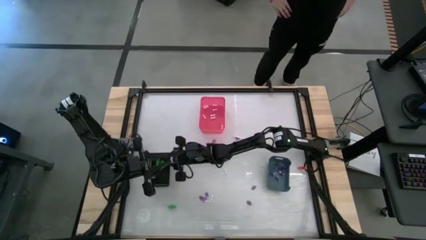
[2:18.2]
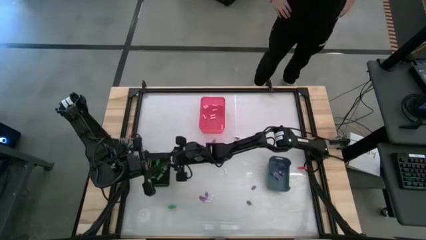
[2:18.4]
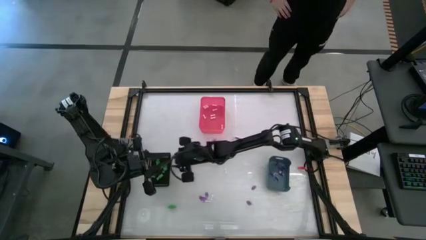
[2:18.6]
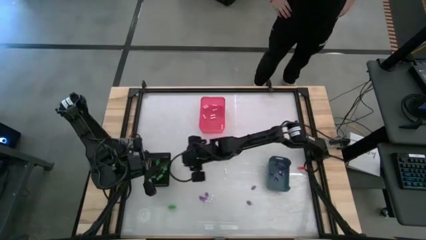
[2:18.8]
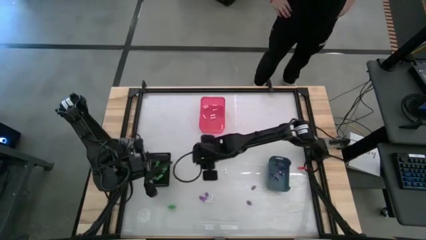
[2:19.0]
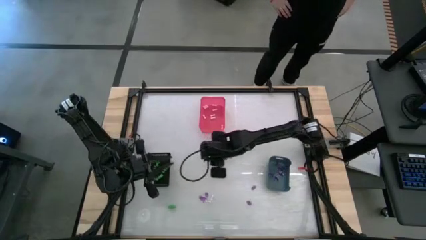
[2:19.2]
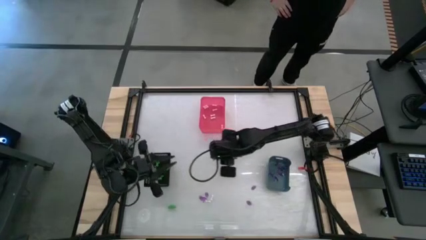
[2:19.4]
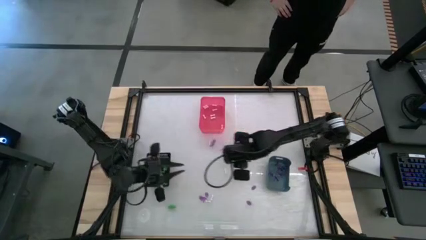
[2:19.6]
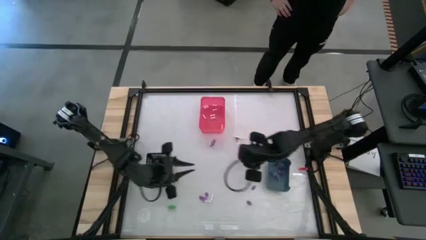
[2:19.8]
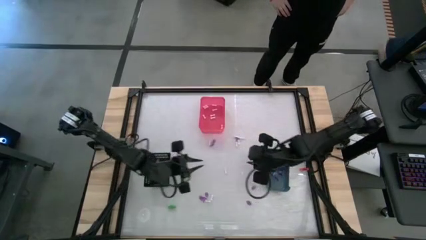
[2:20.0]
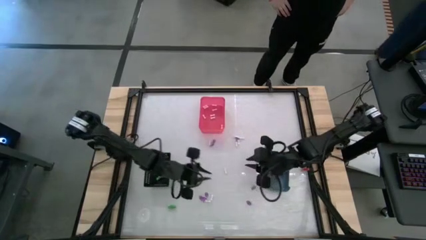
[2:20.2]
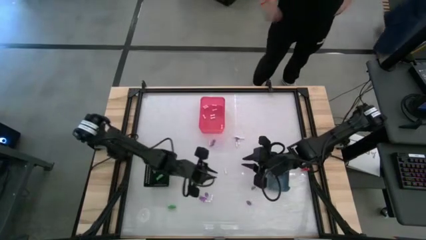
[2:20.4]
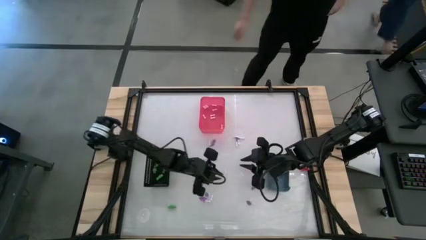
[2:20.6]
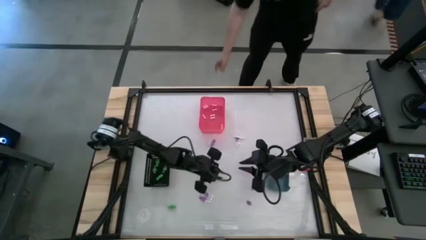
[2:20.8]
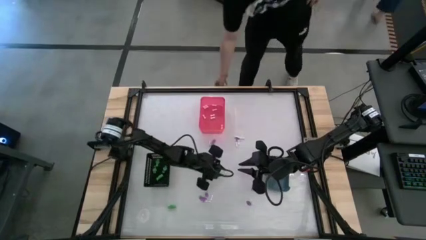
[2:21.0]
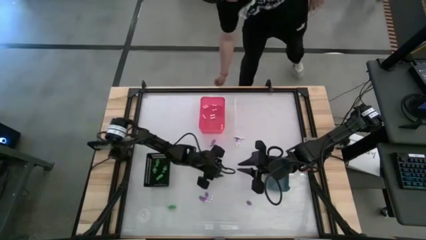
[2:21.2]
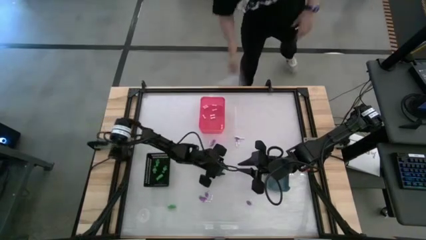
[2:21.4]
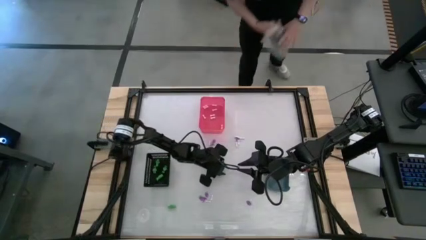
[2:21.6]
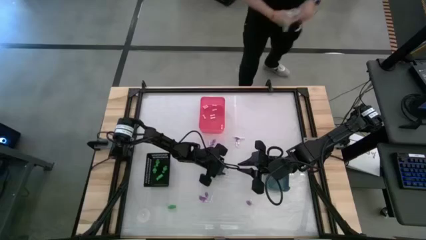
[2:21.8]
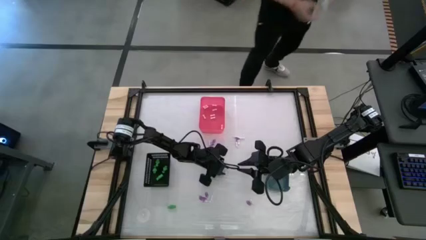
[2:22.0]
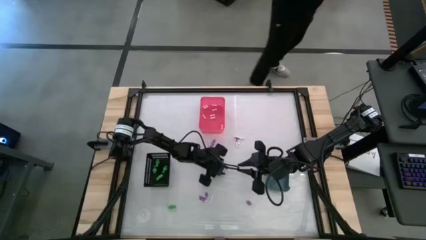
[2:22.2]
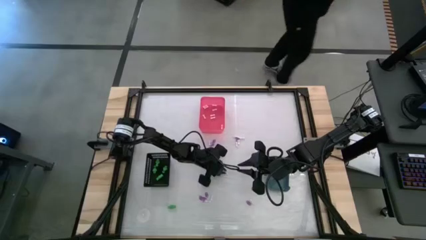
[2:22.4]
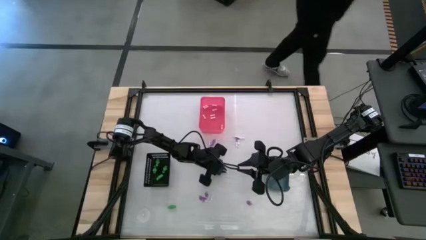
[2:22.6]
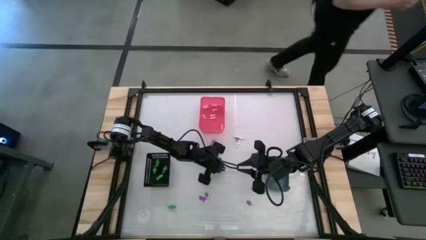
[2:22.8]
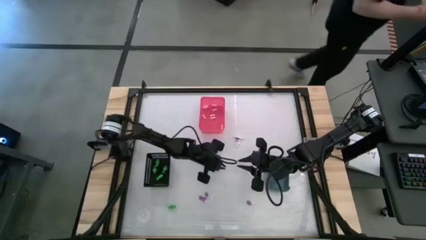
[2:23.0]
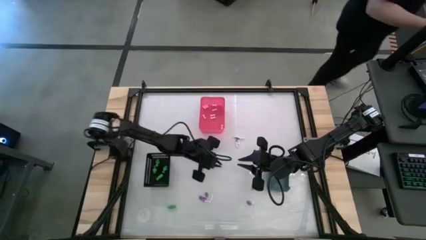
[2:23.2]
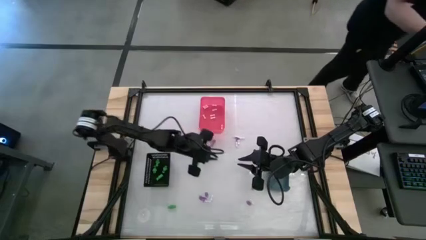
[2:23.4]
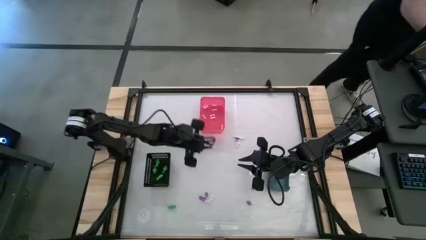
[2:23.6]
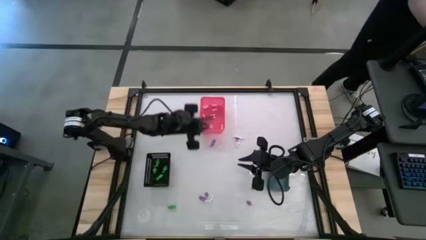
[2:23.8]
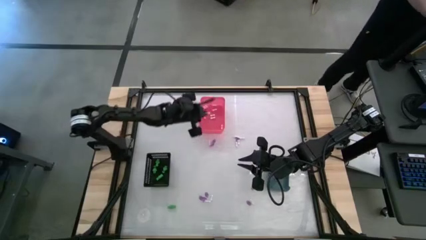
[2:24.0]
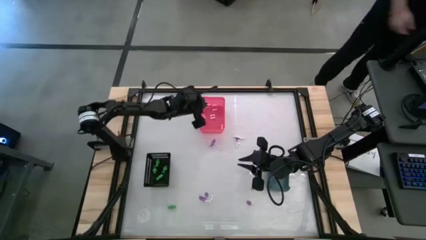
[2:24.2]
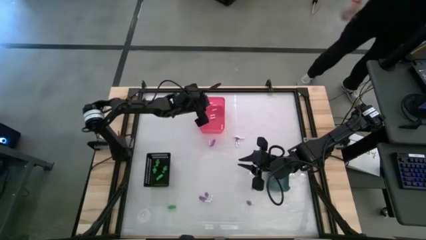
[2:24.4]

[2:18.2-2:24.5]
Task: Sort Halloween decoration
Put the bone toy into the red bin

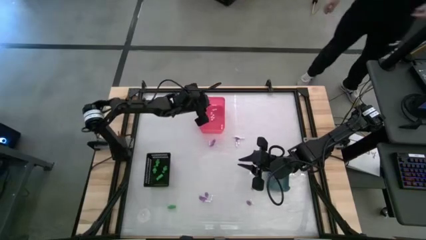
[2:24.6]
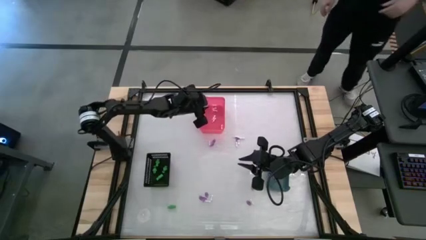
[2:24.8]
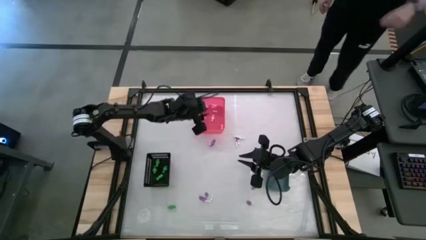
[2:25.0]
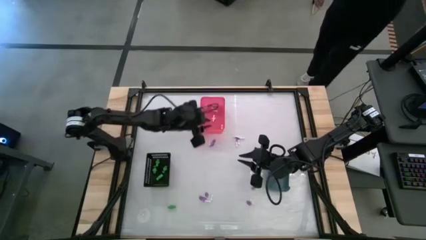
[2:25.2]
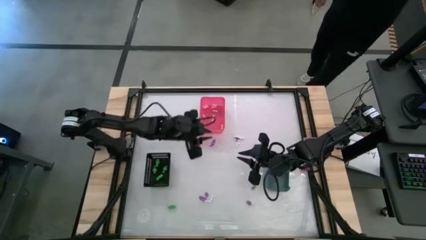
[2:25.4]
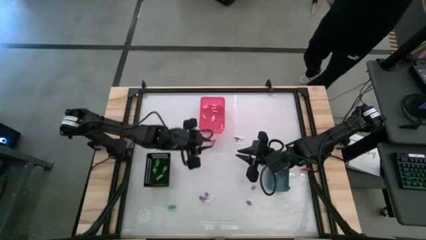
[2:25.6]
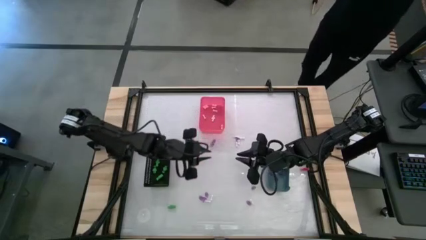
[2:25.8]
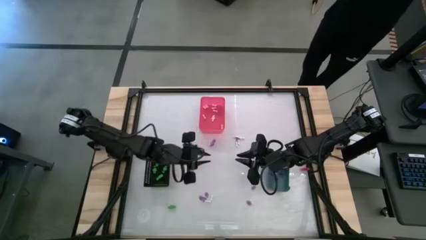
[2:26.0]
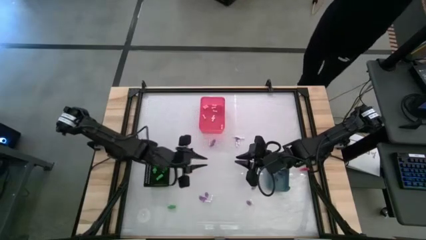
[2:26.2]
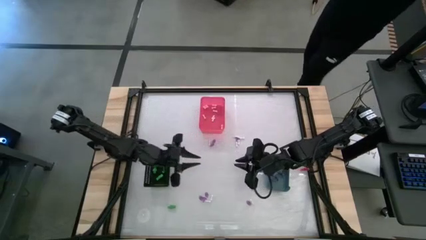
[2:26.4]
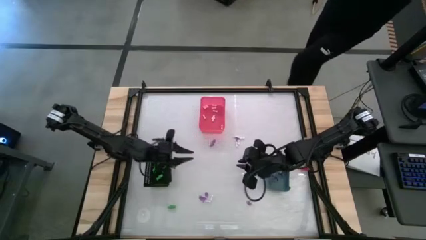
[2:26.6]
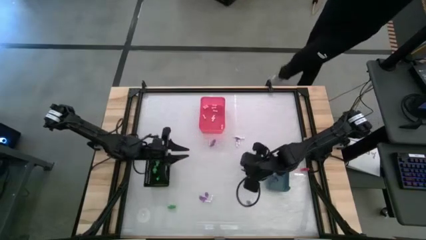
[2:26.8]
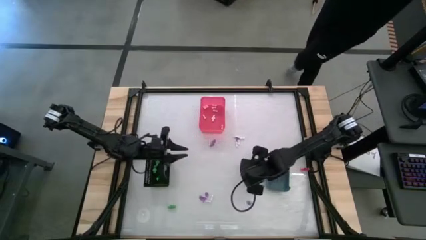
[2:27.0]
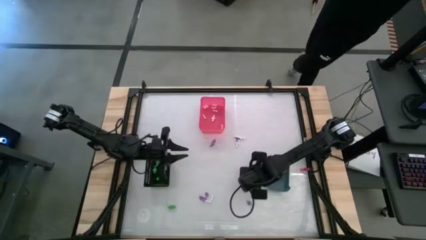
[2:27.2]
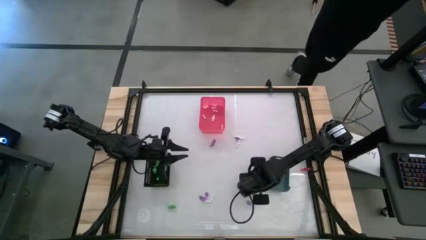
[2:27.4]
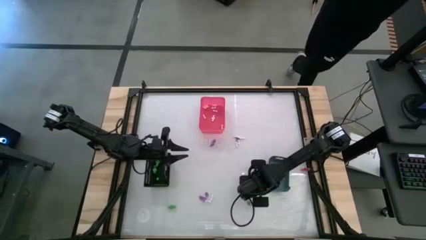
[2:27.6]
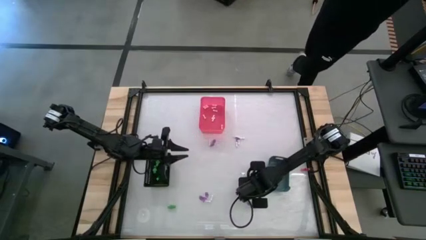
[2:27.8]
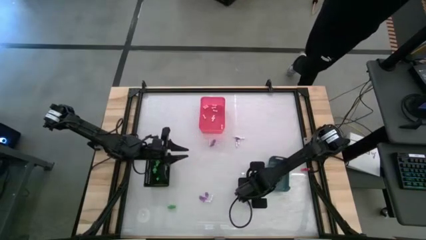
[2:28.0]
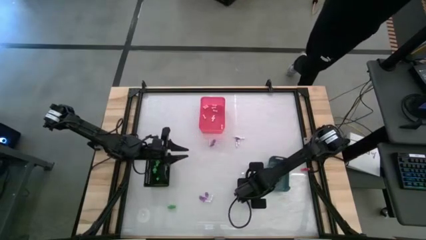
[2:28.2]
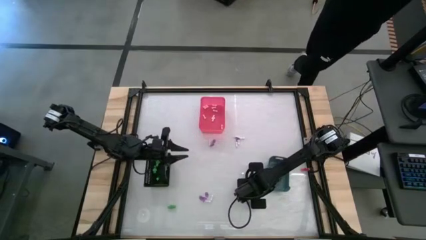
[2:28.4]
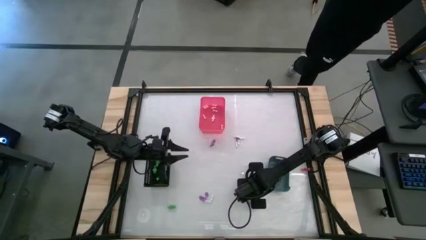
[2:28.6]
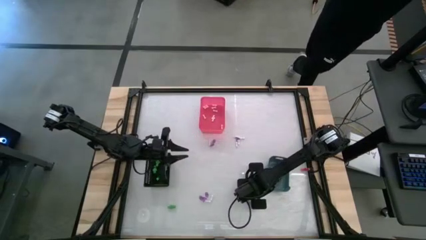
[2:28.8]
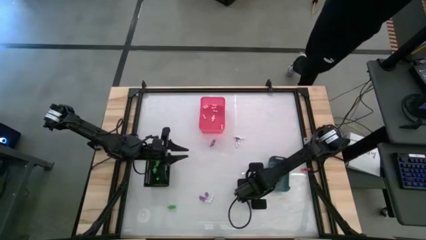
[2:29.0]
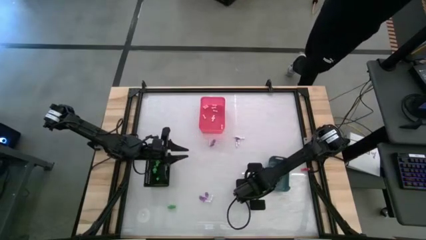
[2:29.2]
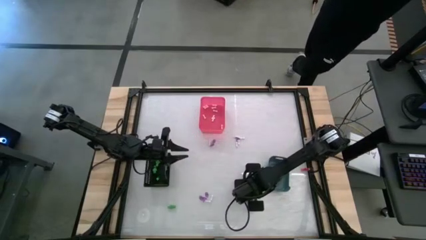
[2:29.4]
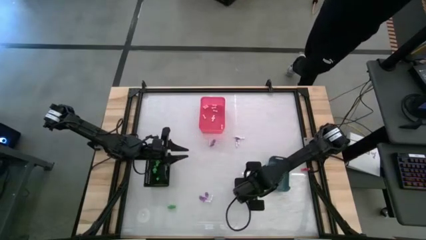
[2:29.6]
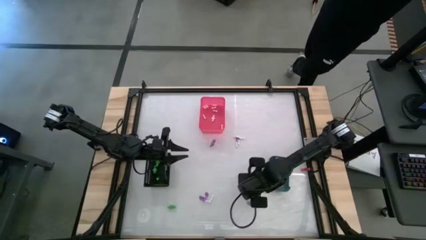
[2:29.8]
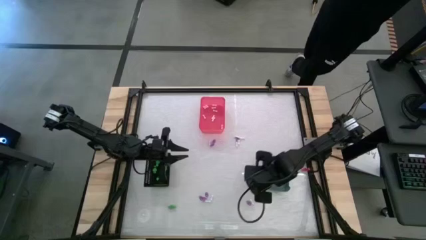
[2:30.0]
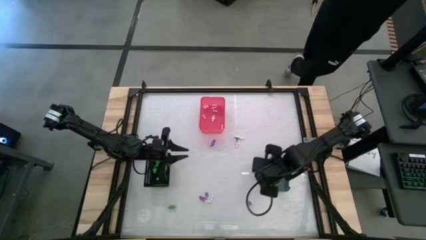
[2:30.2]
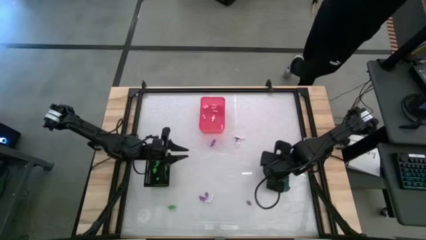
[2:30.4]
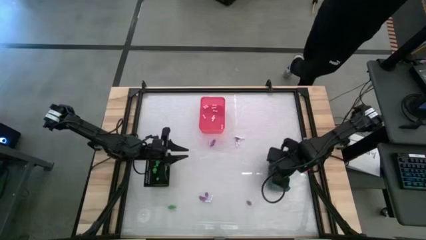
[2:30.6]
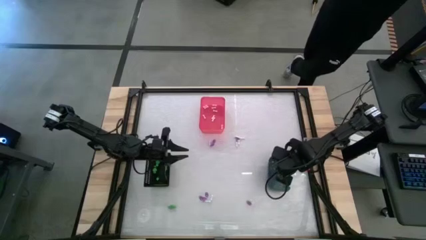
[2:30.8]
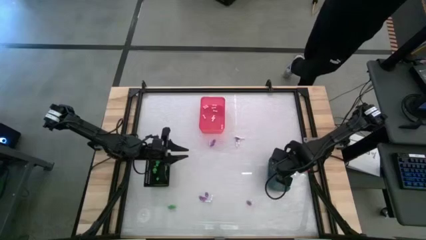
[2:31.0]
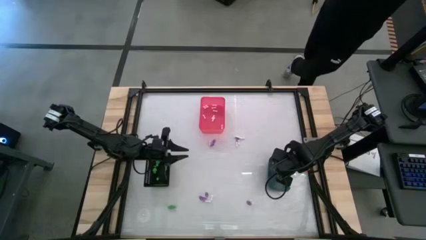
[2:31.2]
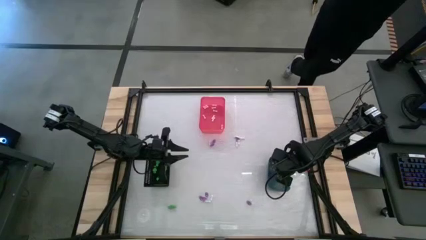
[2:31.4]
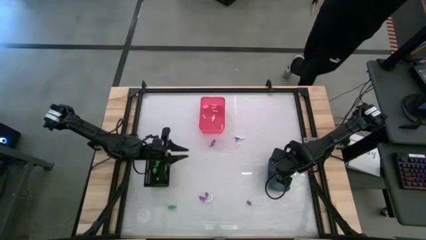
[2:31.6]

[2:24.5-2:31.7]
Put the witch hat toy into the blue bin

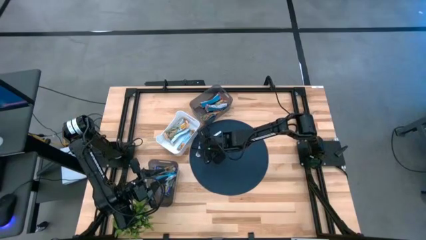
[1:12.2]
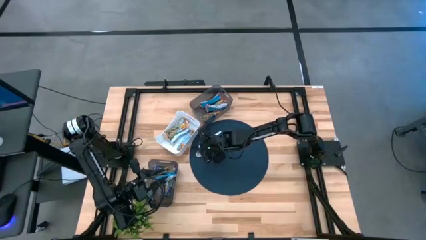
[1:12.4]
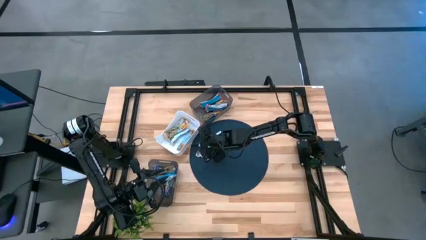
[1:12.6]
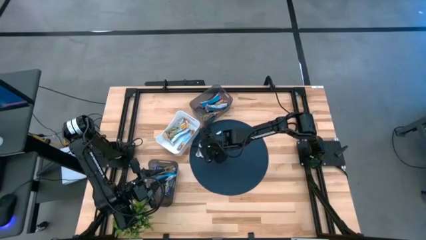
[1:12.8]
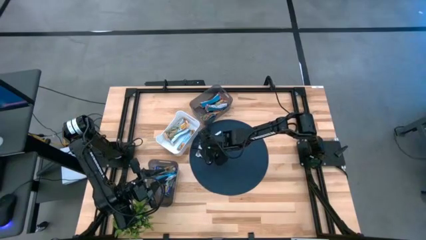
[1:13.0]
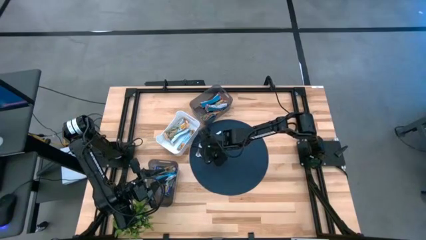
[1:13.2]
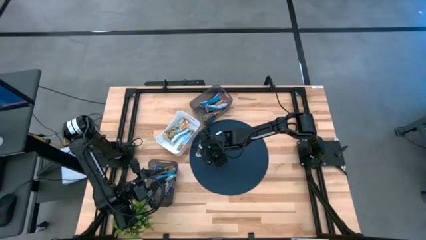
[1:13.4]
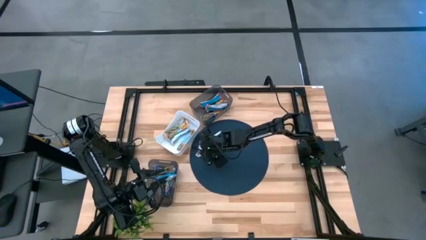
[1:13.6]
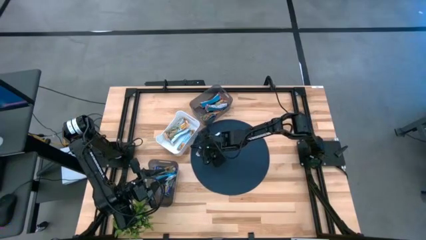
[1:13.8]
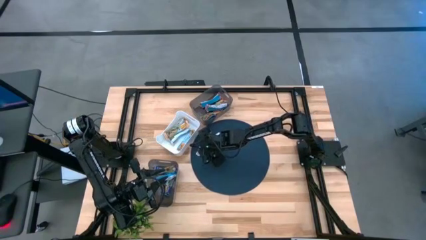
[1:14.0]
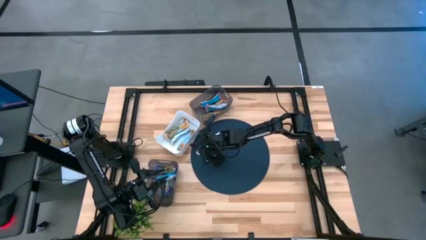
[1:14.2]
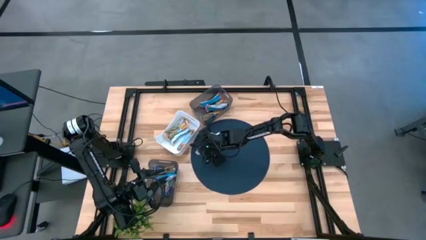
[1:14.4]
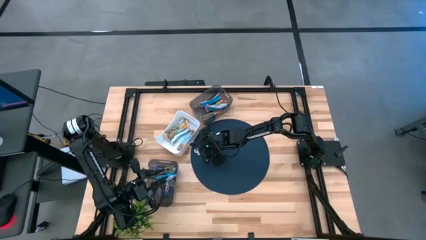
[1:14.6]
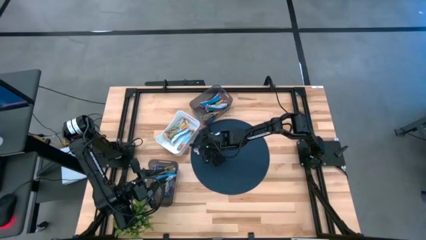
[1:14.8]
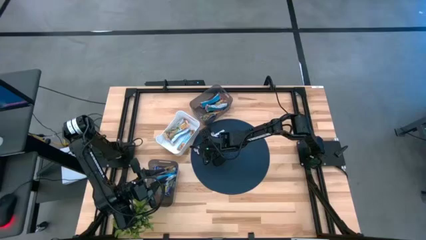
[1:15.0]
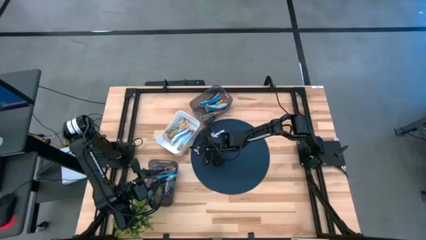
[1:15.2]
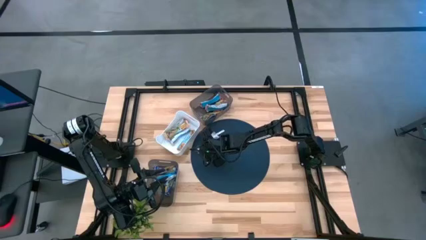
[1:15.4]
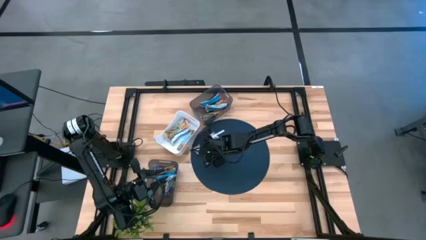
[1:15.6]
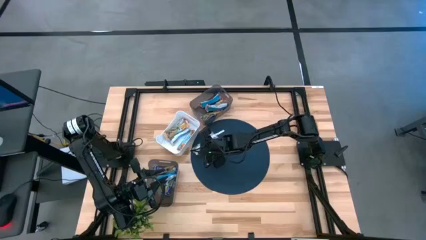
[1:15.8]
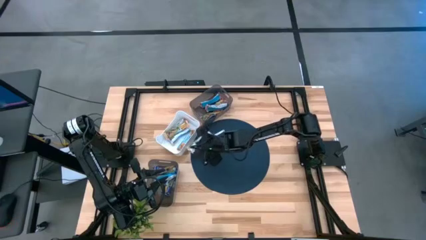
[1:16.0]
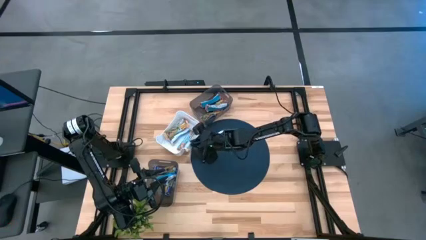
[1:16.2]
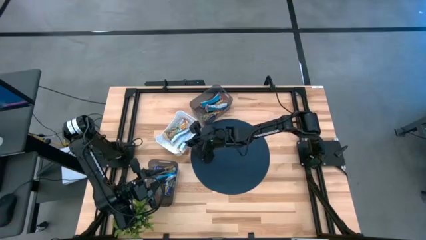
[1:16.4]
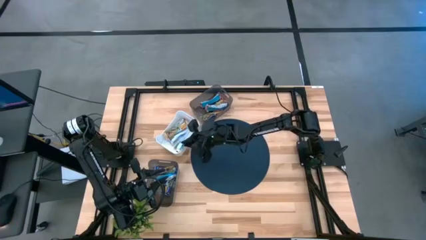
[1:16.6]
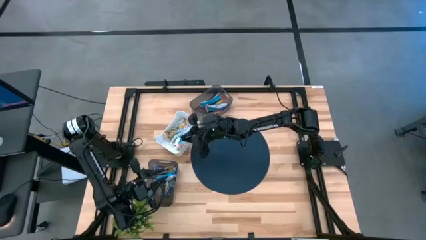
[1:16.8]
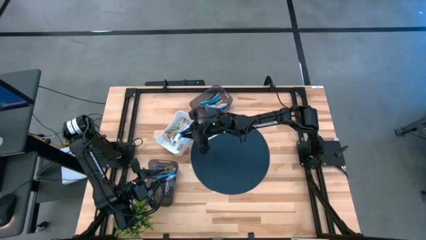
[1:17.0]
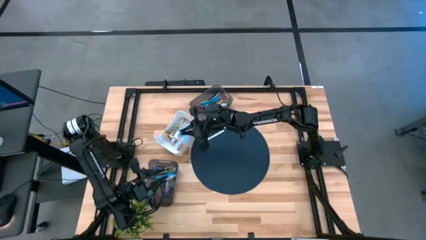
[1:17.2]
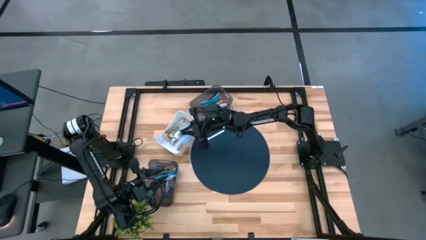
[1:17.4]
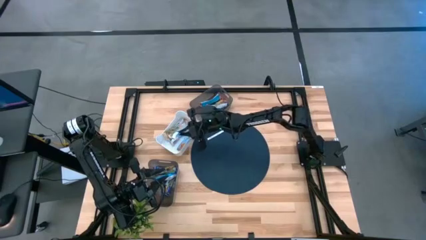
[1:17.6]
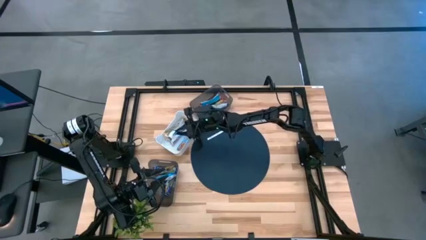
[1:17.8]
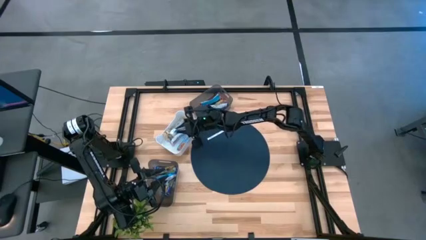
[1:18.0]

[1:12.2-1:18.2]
Task: Pick and place Granola Bars by type
Put the yellow granola bar into the white bin
